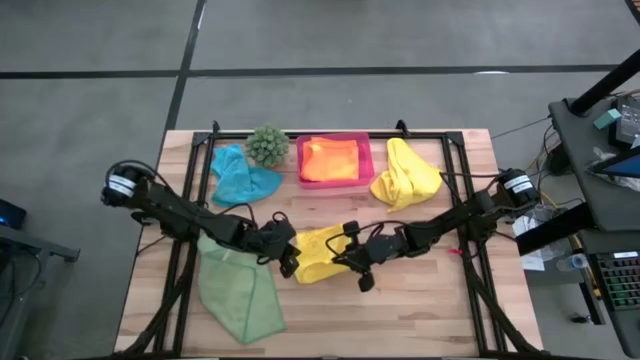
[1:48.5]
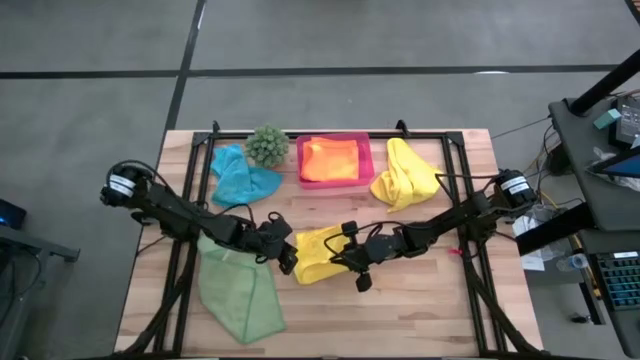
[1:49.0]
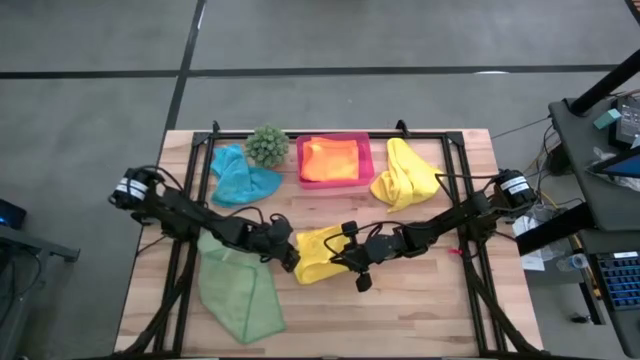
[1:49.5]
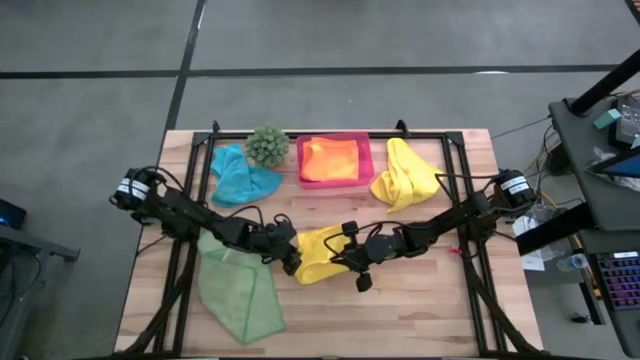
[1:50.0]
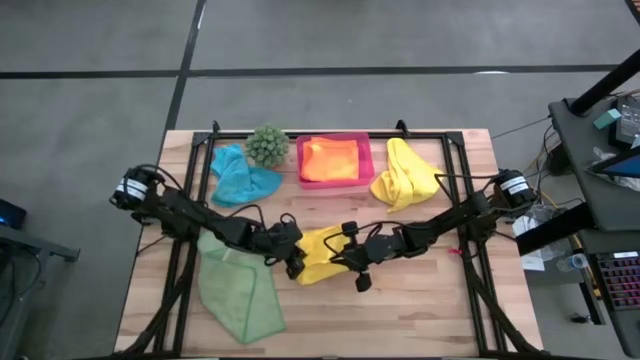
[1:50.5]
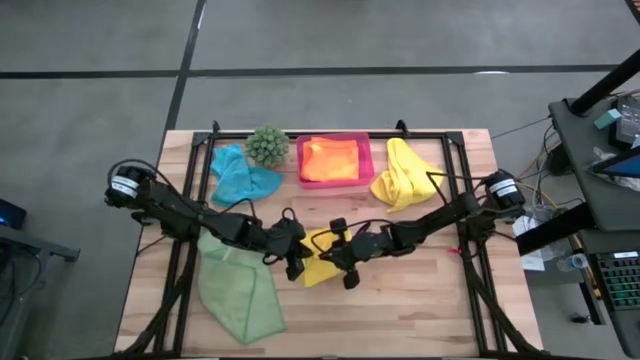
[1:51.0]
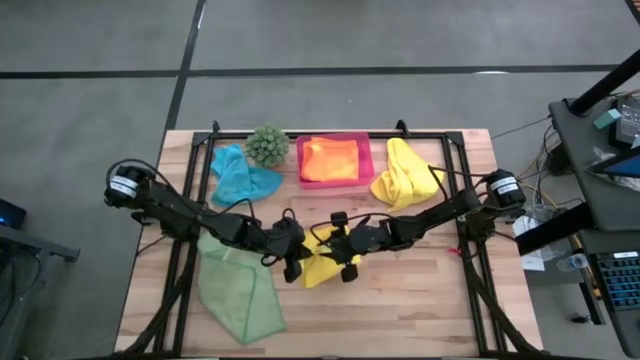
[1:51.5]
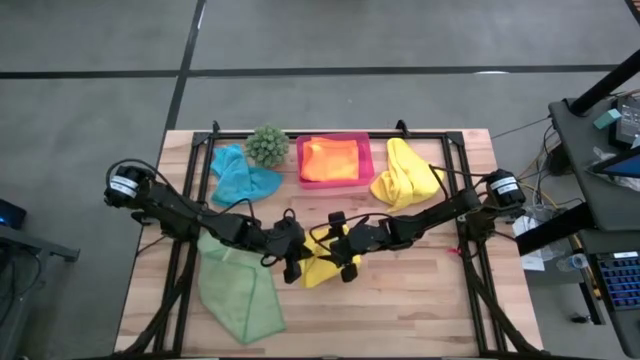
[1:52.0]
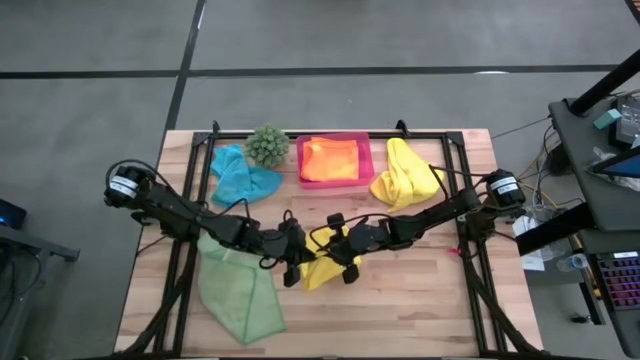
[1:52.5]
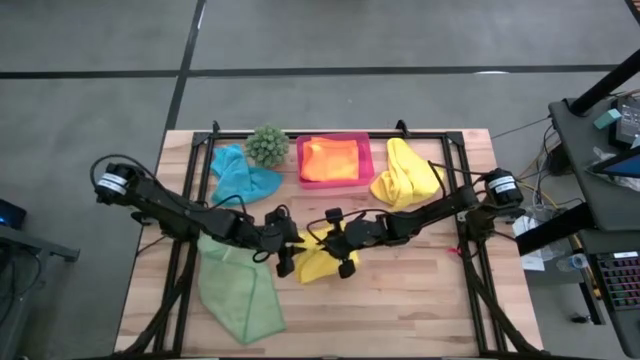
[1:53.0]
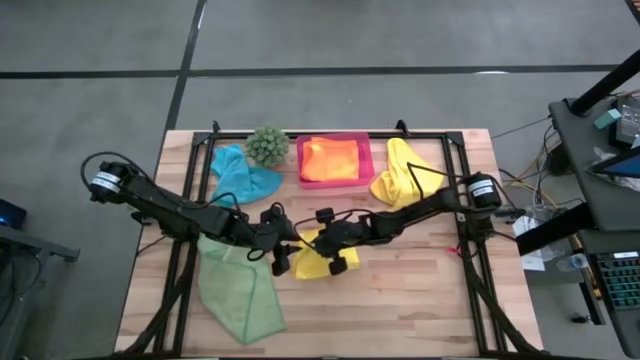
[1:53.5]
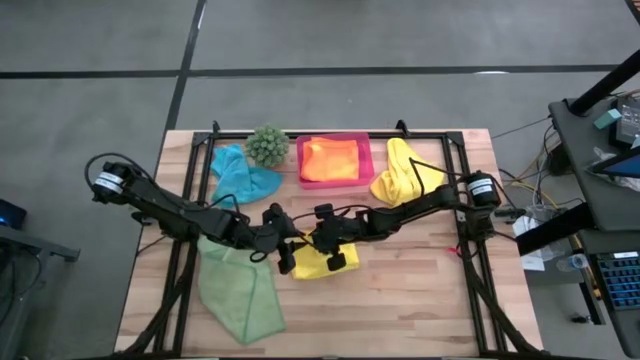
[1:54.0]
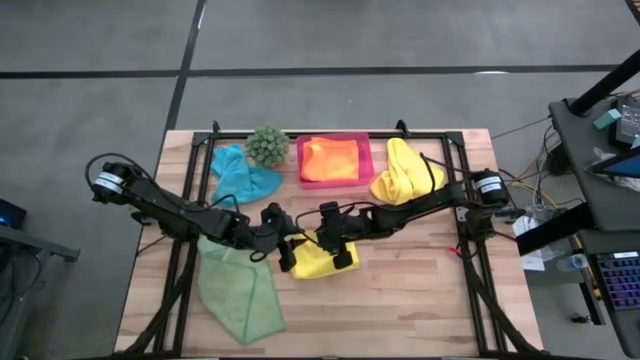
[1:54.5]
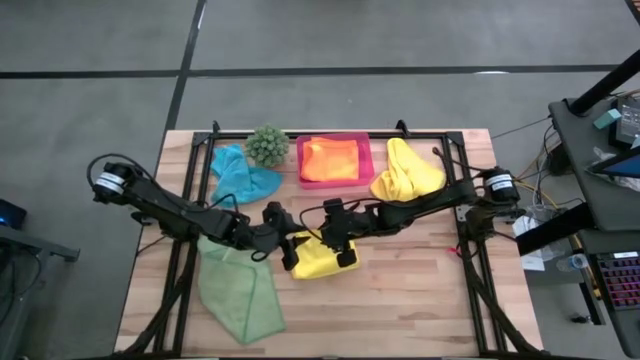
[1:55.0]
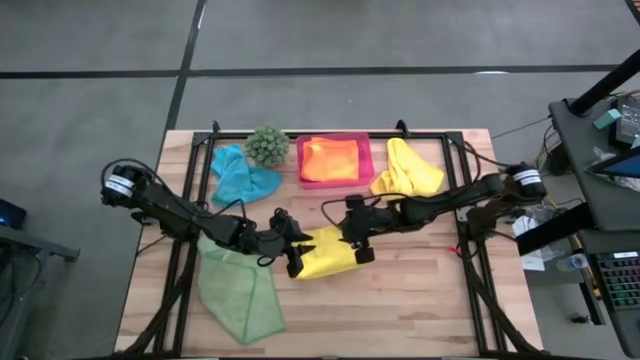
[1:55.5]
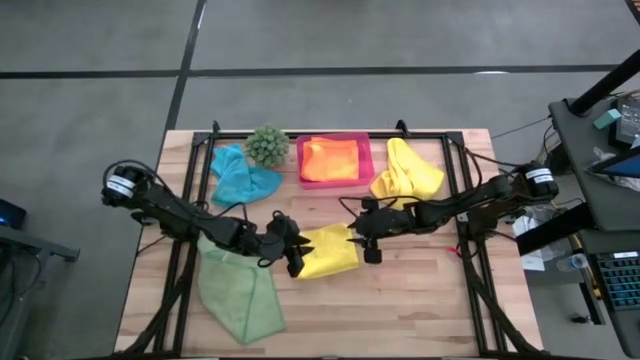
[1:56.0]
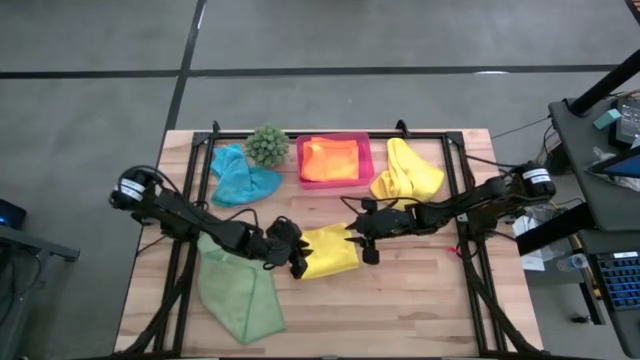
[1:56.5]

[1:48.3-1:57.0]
Task: Fold microfiber towels
Fold the bottom yellow microfiber towel

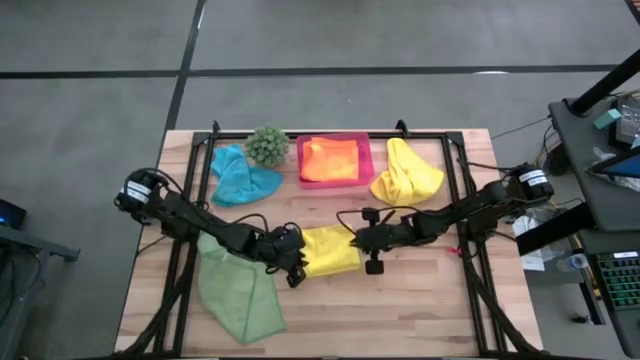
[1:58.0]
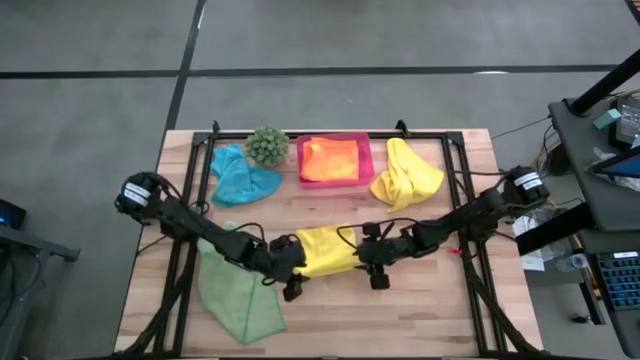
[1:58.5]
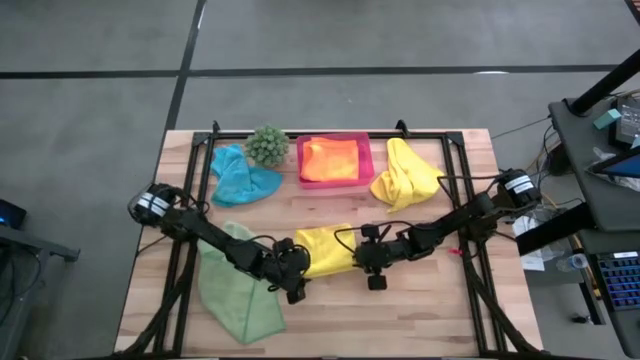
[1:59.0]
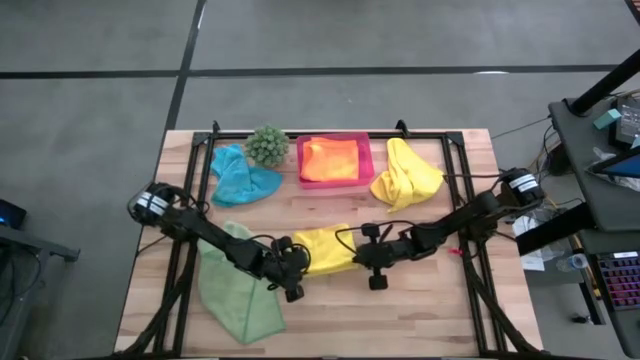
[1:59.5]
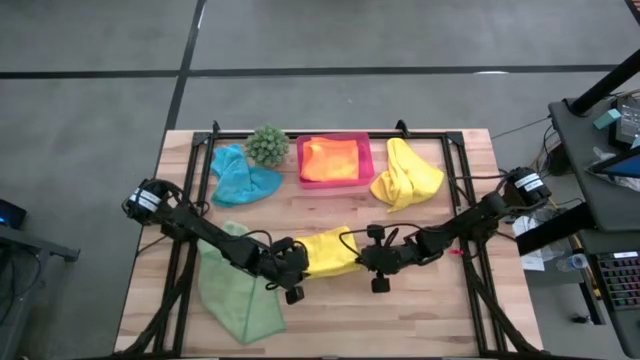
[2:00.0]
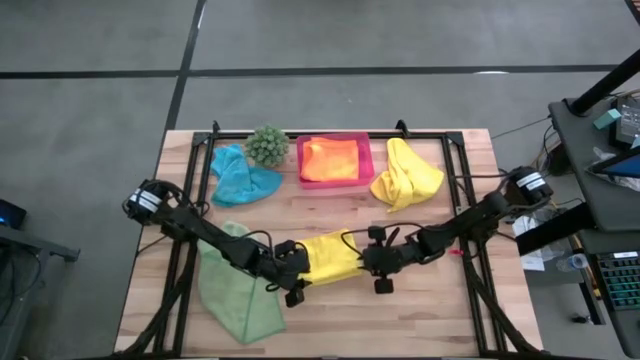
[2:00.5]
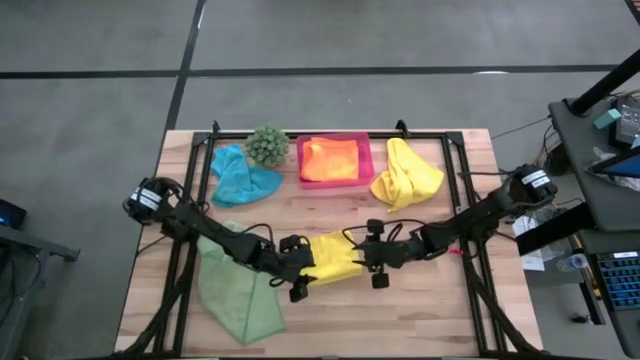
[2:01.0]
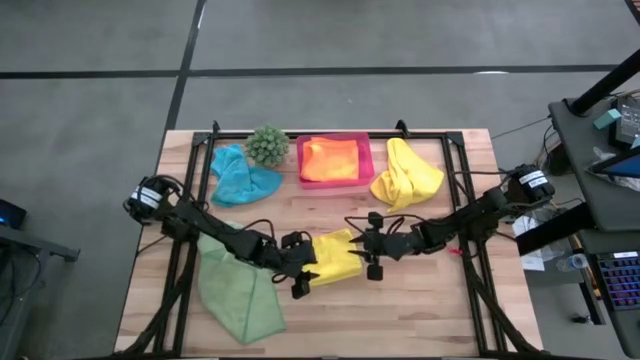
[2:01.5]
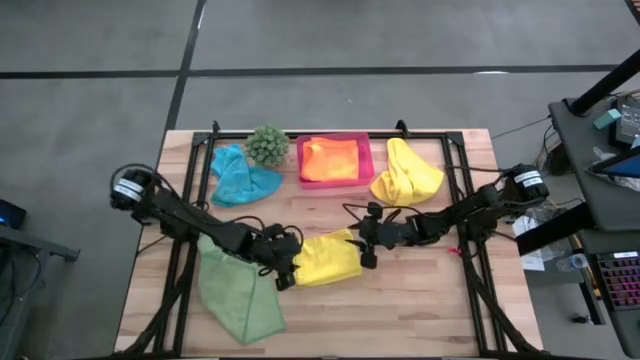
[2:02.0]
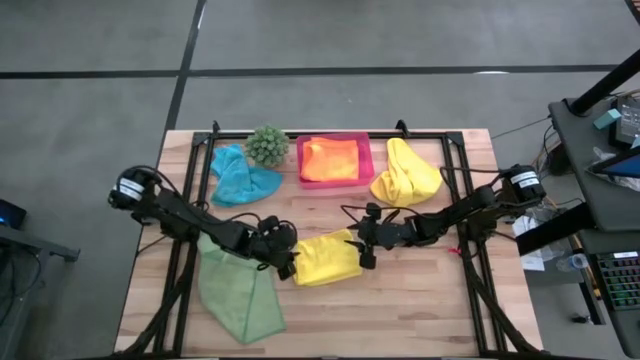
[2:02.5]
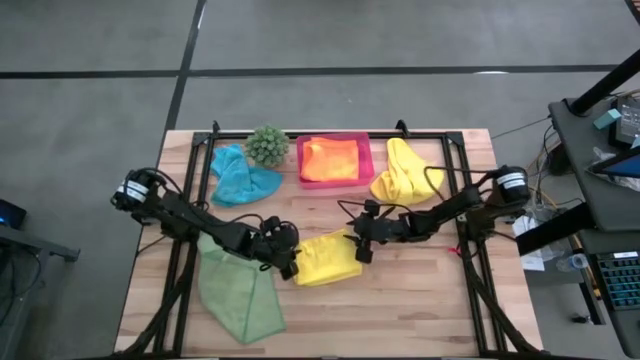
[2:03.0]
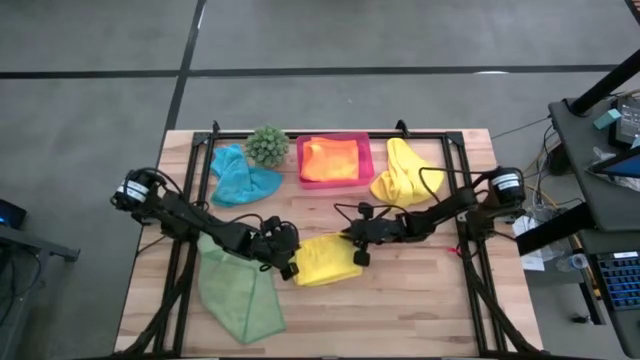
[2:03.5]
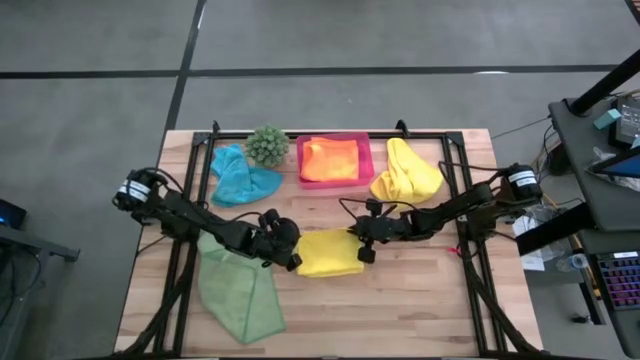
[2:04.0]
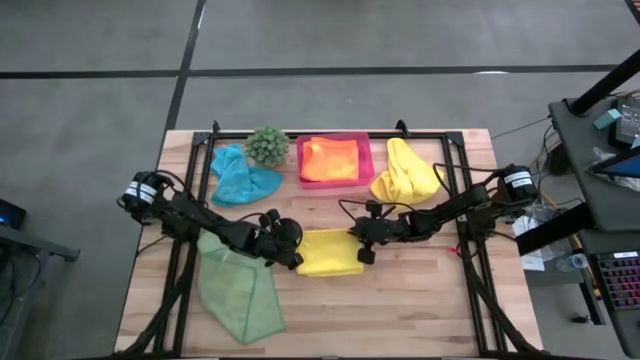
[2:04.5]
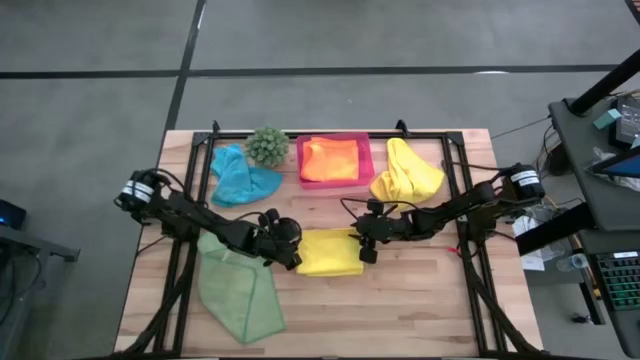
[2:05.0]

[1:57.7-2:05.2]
Fold the bottom yellow microfiber towel

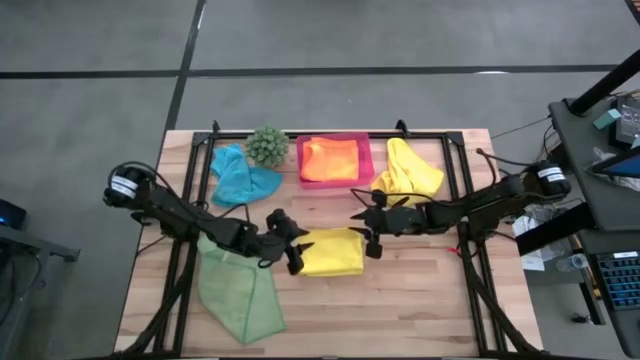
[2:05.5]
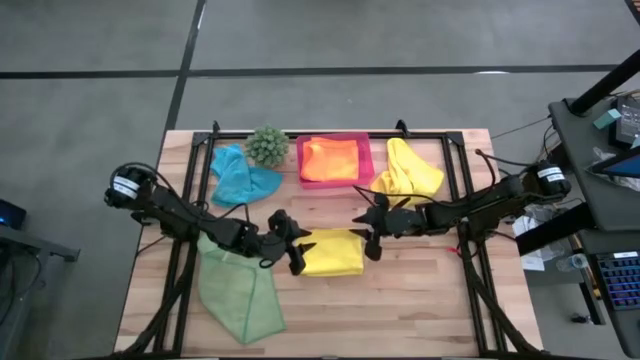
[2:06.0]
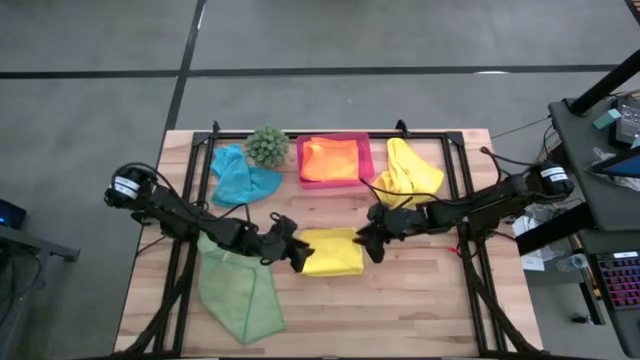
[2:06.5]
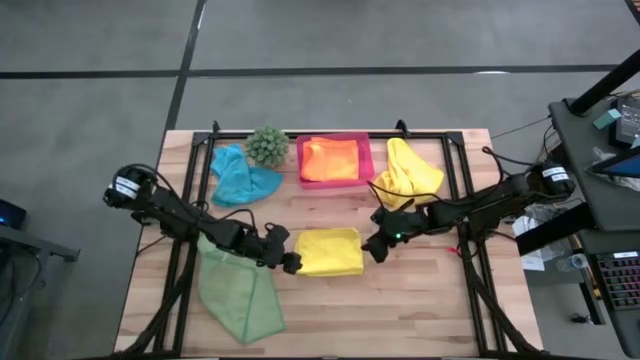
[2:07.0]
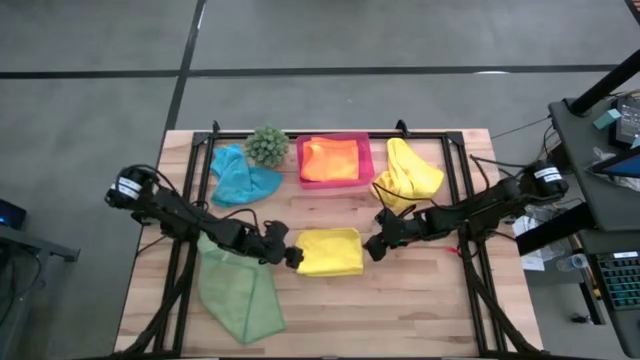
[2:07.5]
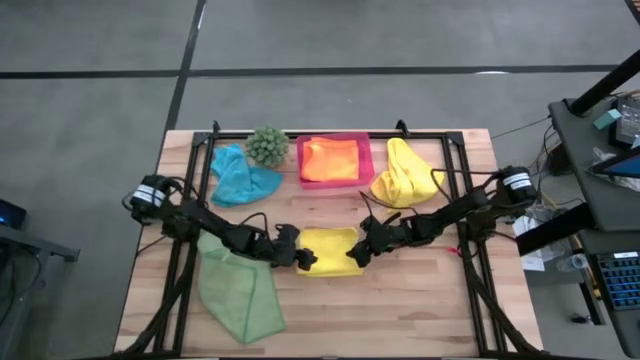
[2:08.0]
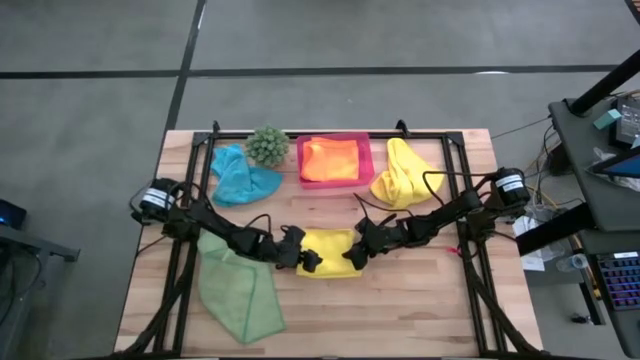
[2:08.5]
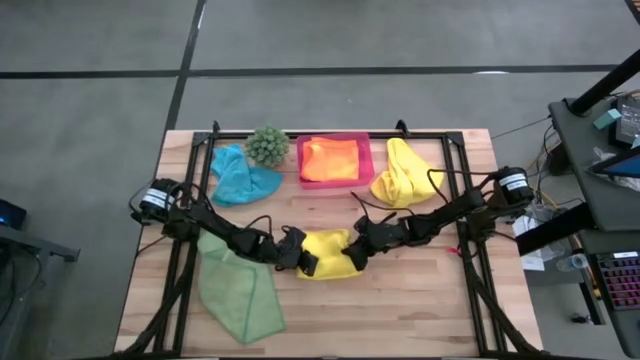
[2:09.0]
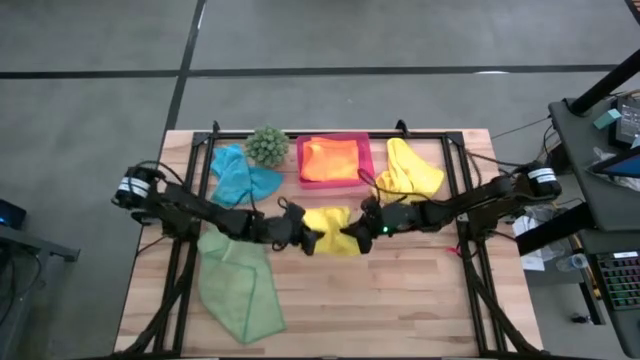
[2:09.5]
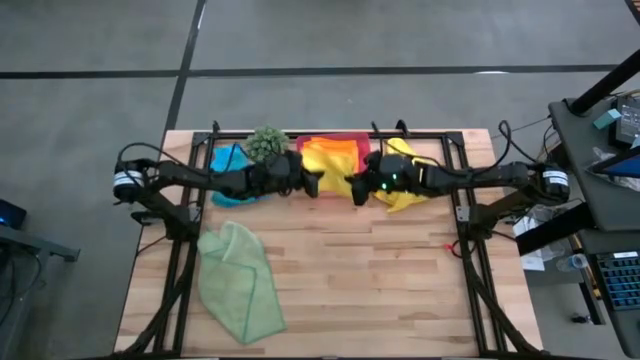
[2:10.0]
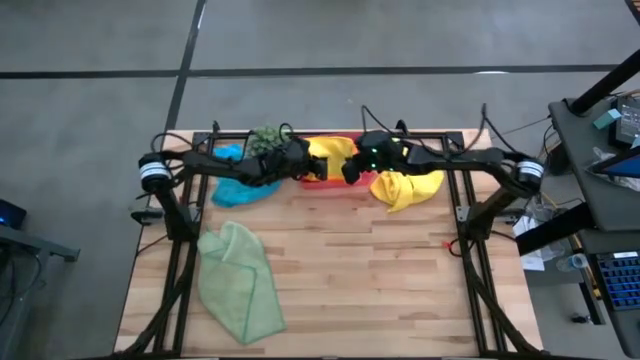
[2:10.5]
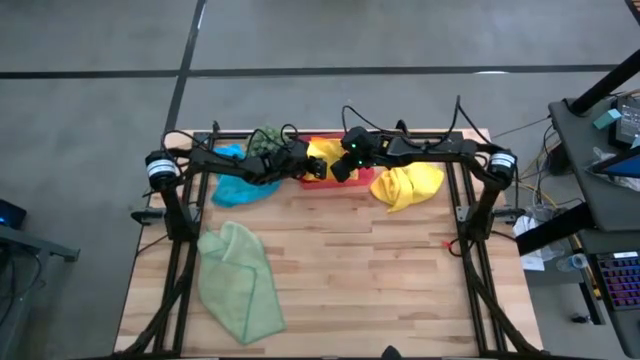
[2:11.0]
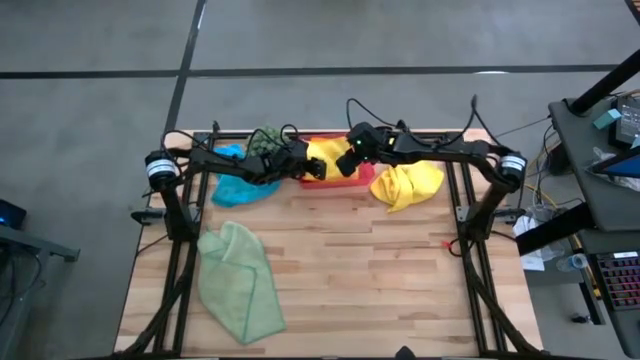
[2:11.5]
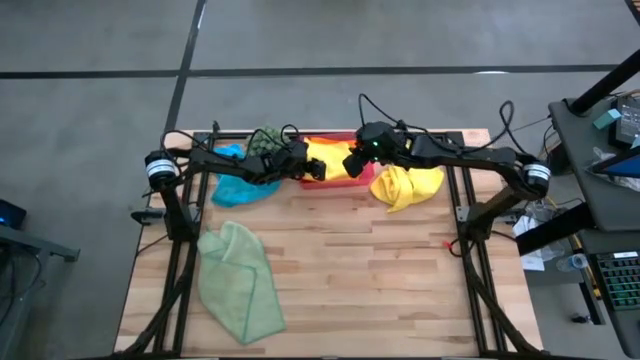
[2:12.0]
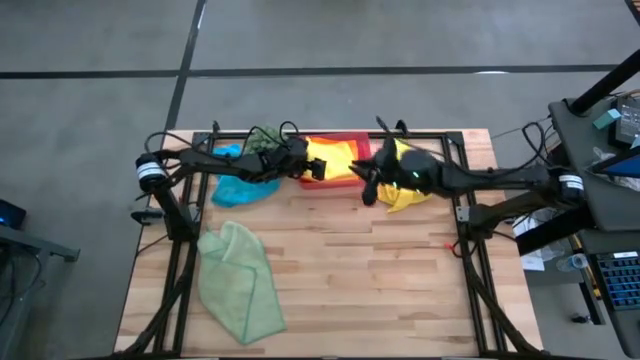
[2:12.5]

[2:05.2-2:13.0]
Put the folded yellow microfiber towel into the red bin
